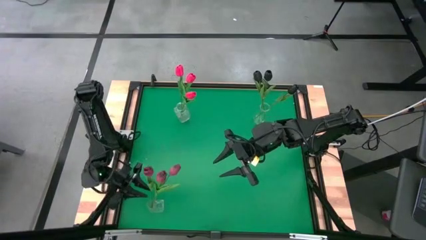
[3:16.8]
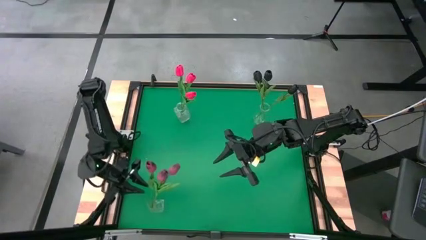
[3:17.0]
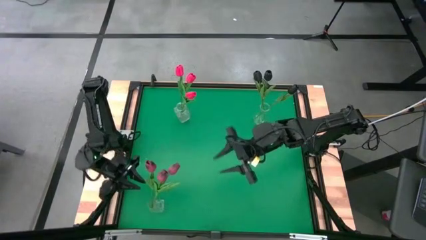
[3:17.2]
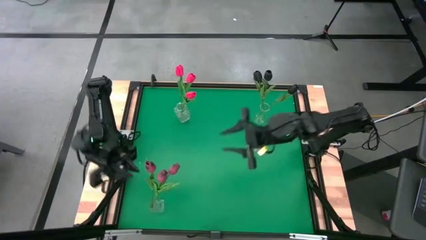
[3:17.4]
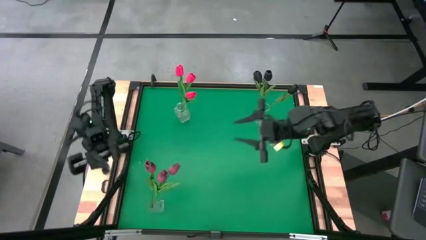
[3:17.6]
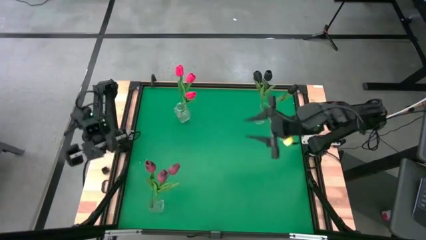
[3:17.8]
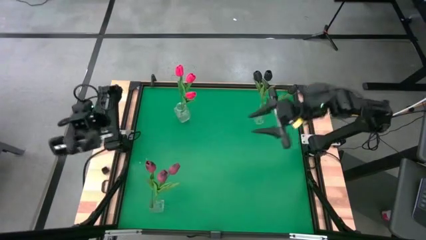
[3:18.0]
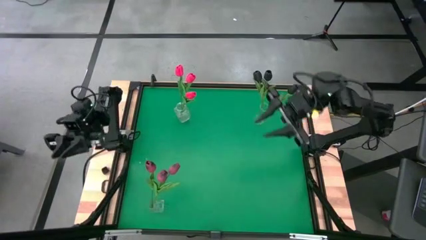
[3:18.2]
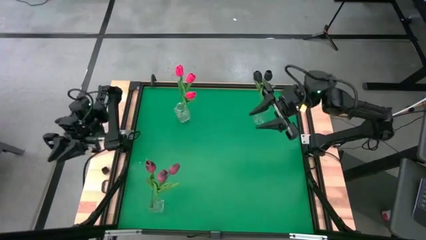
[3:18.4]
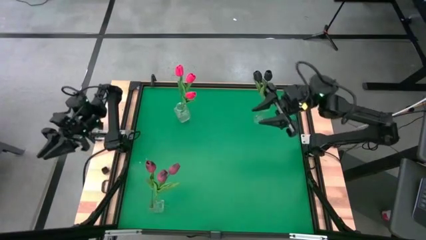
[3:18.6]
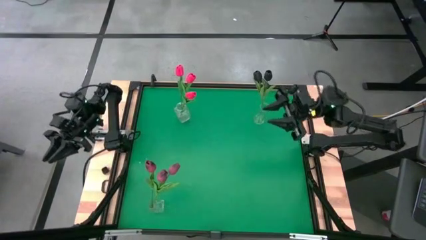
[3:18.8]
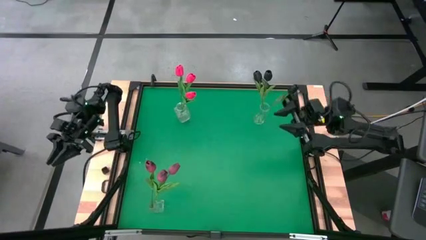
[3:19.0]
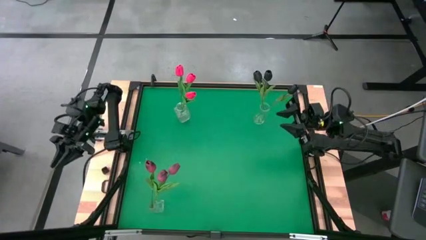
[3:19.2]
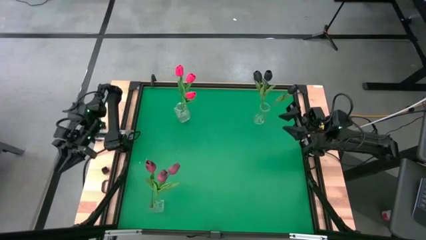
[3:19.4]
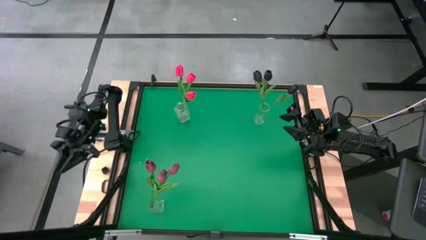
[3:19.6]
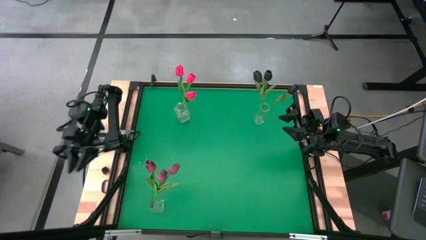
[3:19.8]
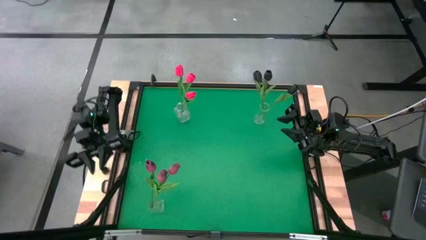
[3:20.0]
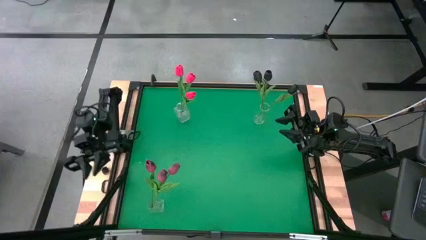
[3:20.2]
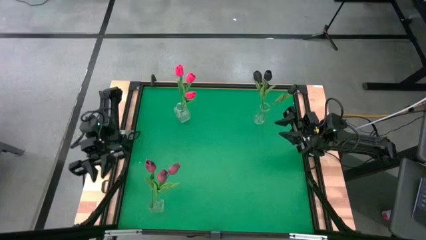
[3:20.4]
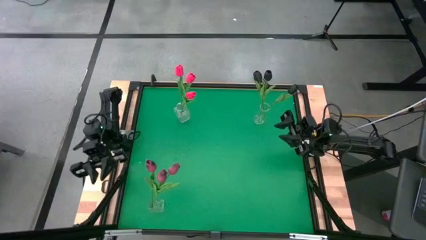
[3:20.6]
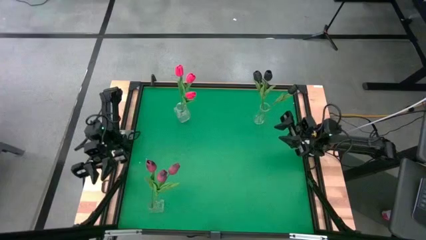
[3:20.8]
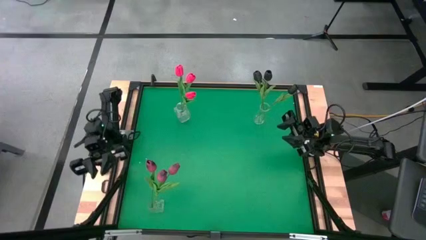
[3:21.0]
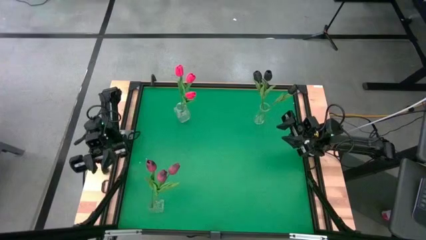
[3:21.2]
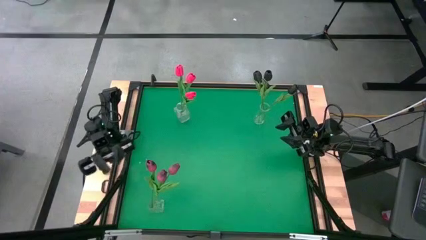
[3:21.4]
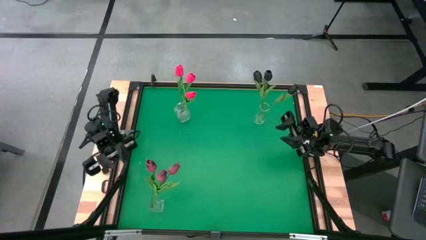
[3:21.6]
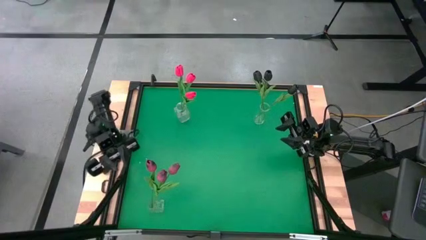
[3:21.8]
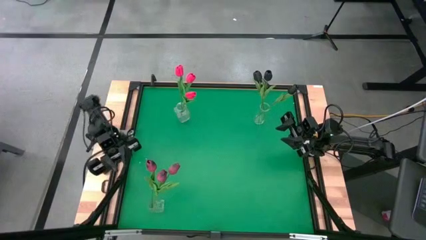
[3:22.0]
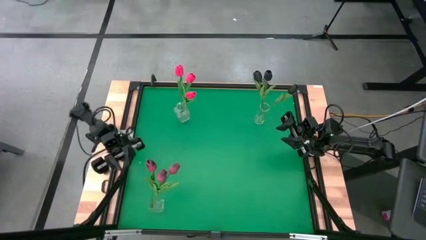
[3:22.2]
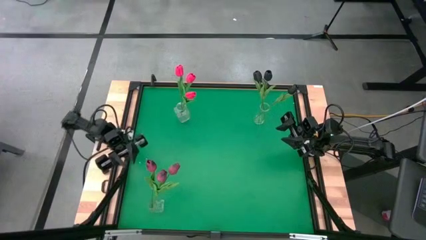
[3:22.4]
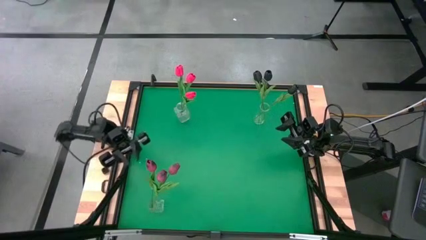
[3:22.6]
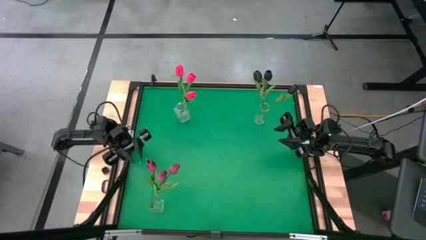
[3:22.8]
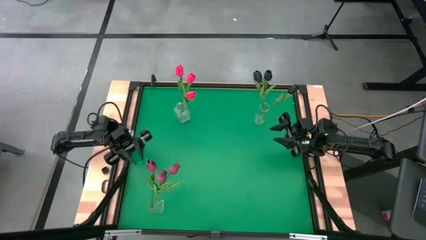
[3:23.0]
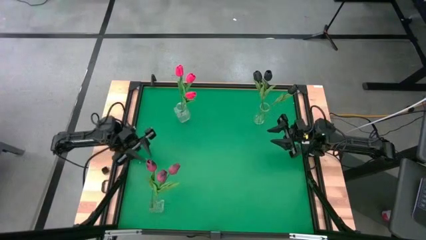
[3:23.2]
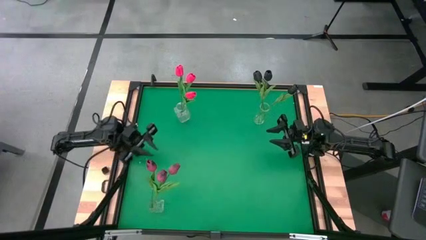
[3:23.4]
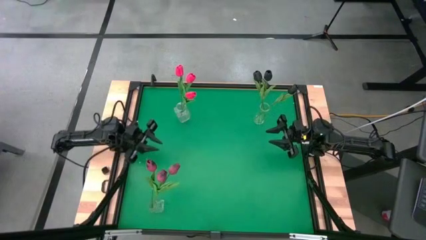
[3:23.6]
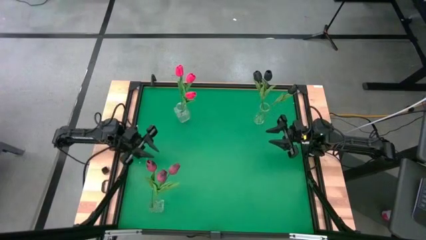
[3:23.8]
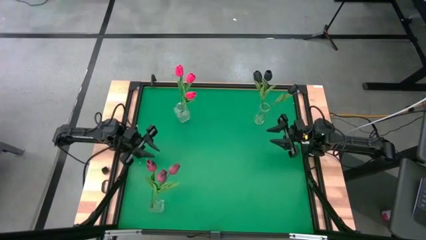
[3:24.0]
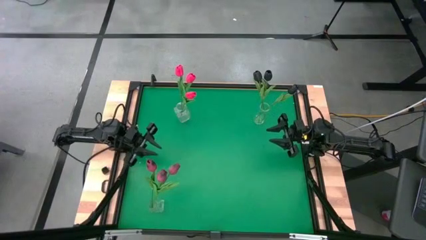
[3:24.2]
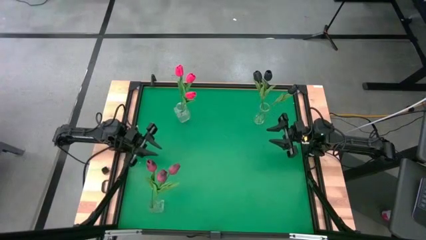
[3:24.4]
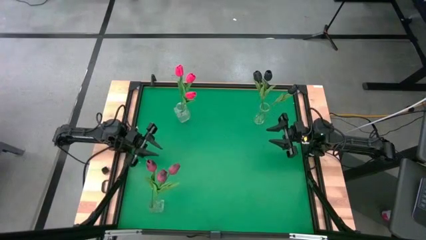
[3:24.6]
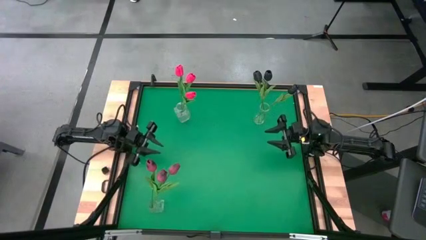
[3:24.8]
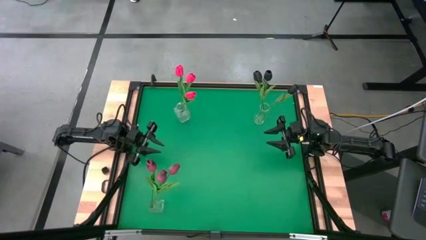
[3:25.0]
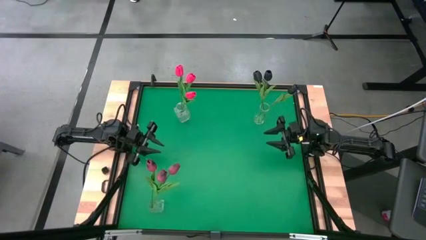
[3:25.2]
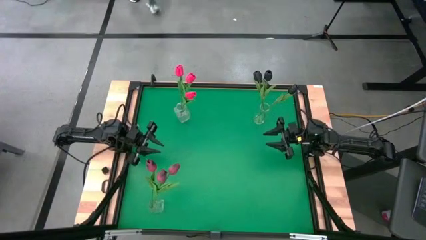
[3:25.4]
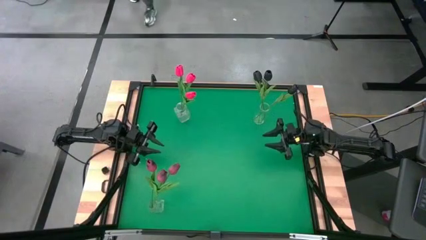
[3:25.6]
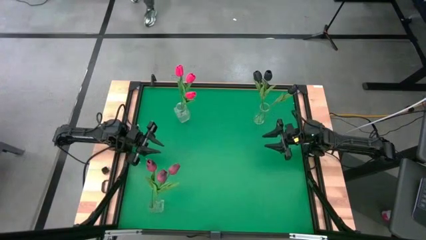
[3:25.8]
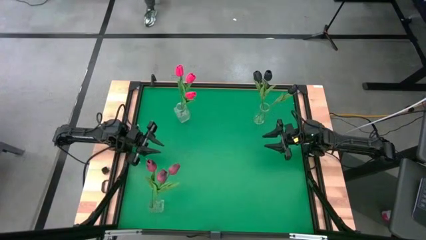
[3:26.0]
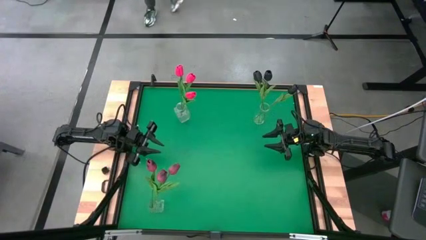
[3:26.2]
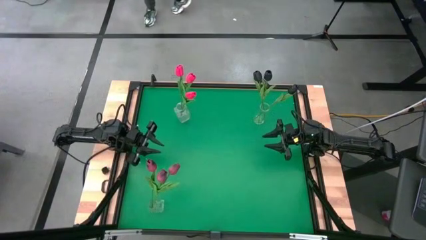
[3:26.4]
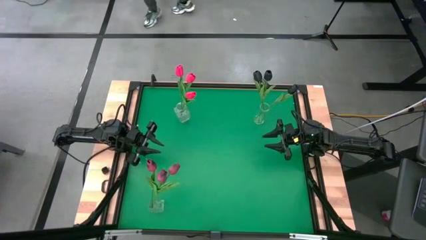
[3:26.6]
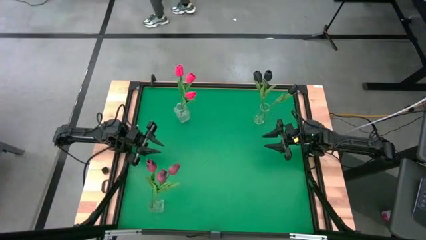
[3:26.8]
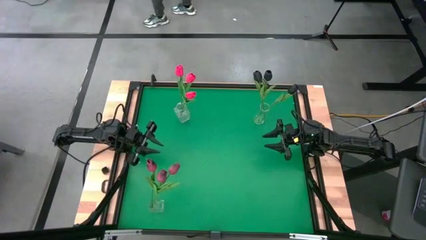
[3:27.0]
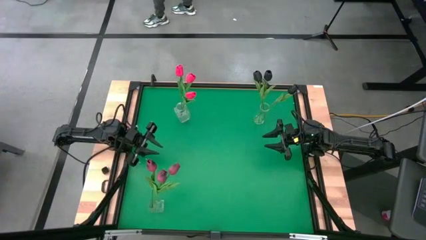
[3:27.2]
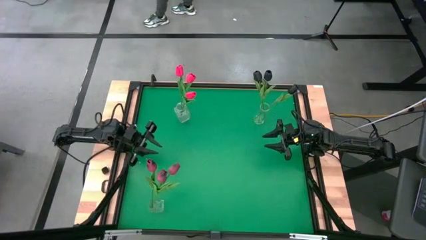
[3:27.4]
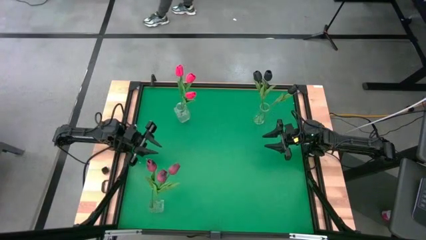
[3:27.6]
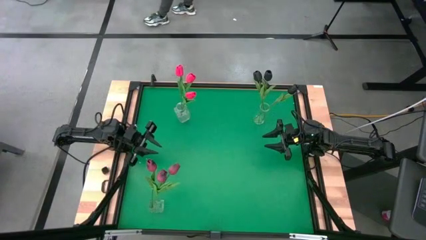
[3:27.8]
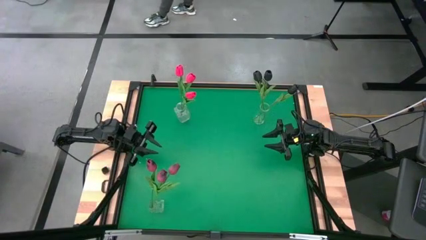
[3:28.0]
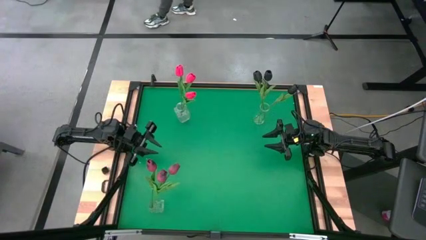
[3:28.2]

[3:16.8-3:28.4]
Task: Sort flowers into vase by color
Return to Home Position
